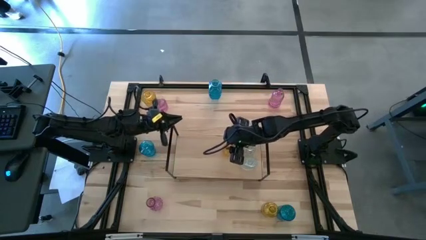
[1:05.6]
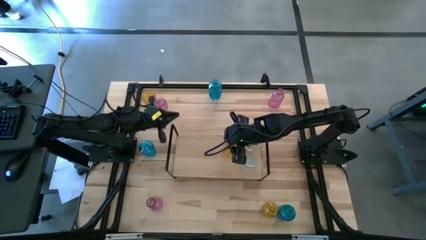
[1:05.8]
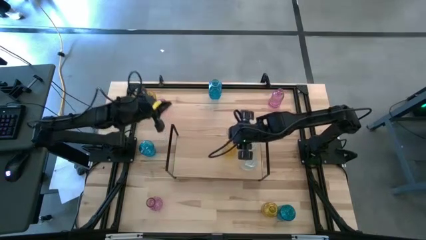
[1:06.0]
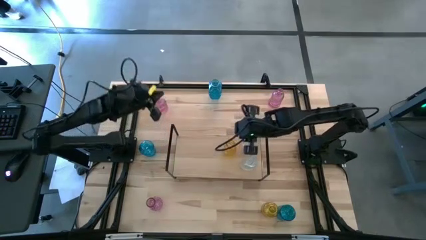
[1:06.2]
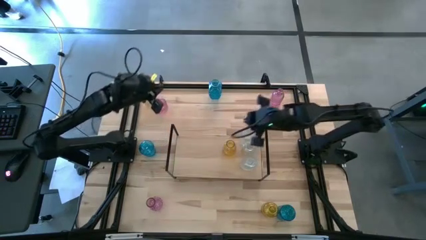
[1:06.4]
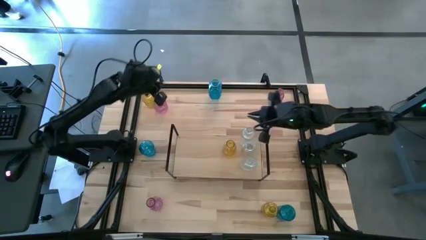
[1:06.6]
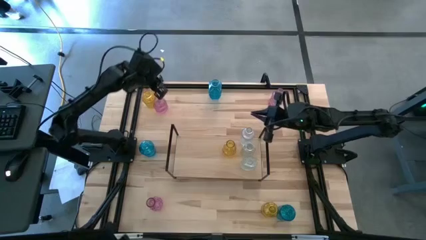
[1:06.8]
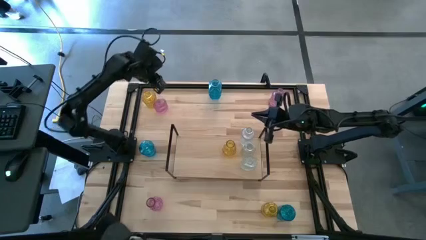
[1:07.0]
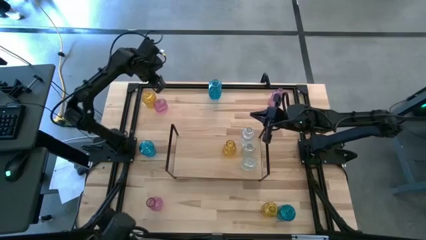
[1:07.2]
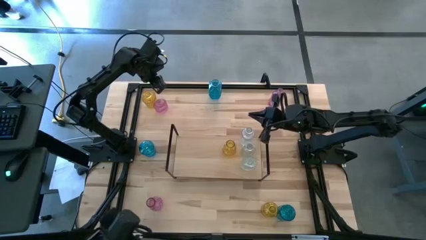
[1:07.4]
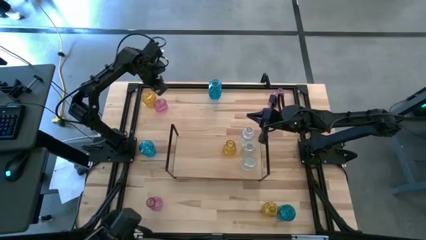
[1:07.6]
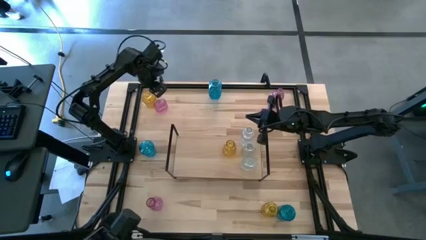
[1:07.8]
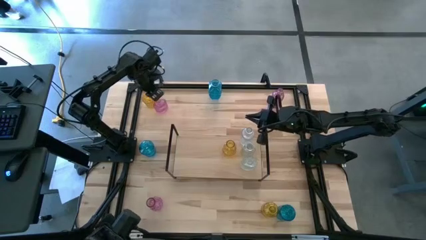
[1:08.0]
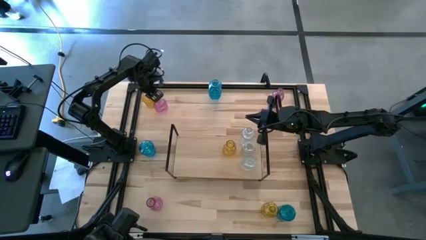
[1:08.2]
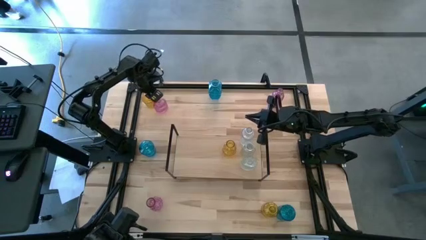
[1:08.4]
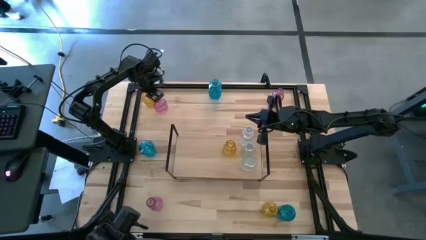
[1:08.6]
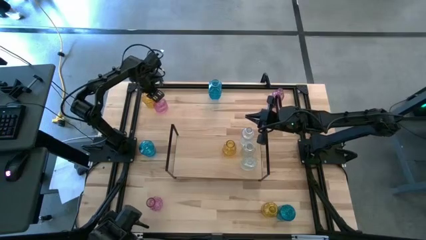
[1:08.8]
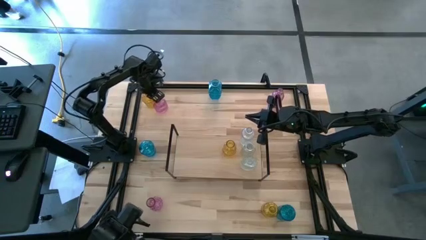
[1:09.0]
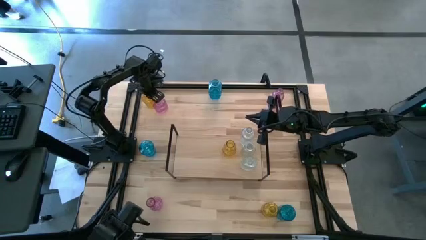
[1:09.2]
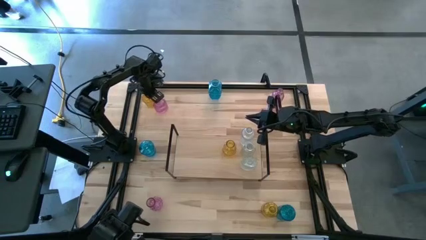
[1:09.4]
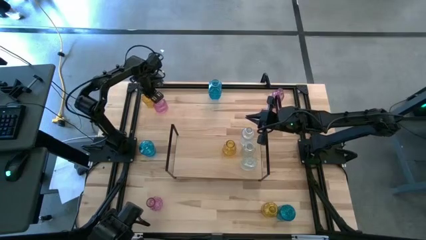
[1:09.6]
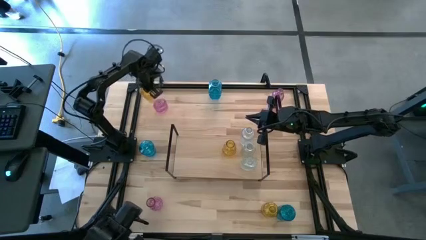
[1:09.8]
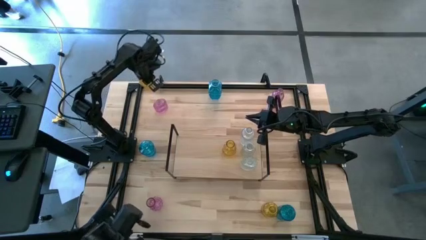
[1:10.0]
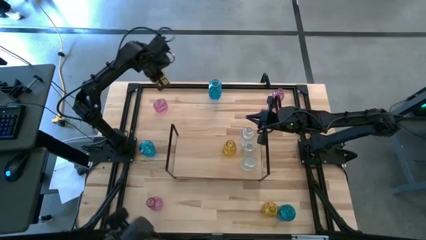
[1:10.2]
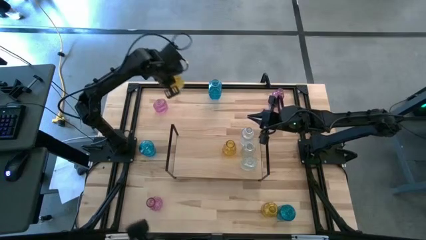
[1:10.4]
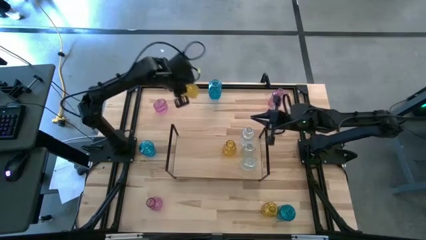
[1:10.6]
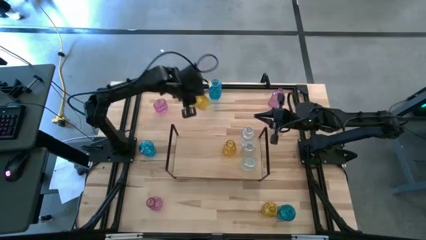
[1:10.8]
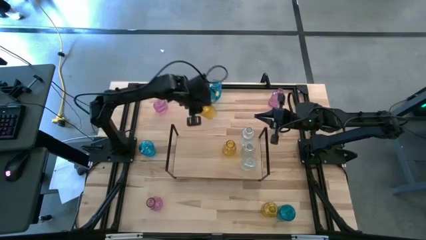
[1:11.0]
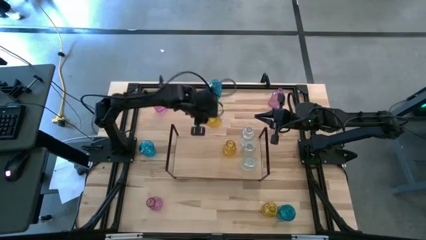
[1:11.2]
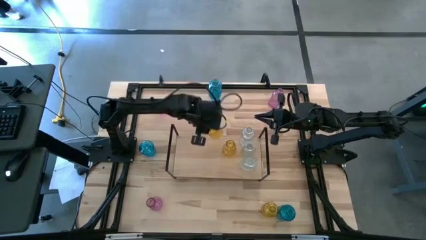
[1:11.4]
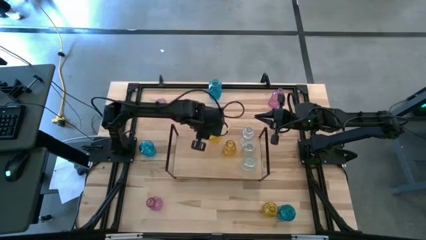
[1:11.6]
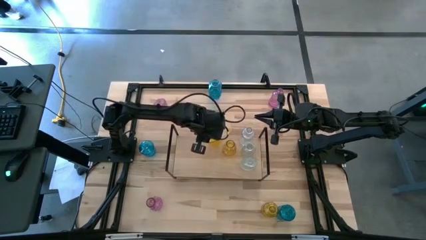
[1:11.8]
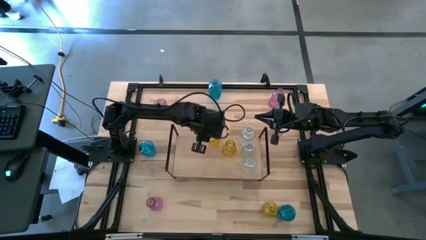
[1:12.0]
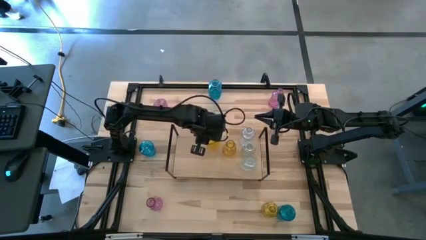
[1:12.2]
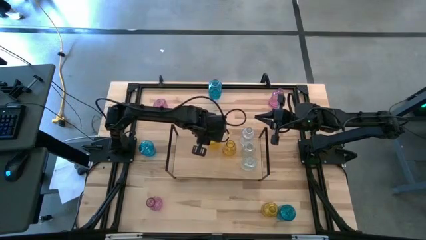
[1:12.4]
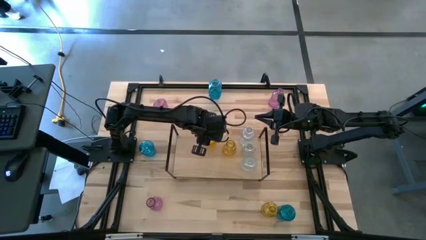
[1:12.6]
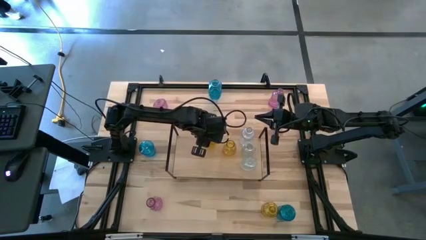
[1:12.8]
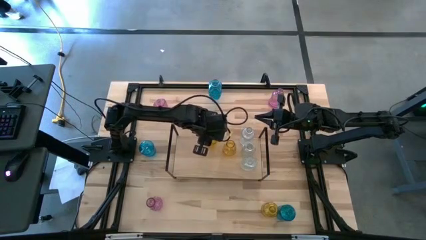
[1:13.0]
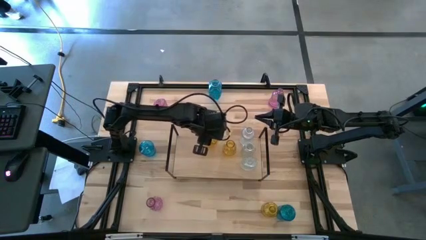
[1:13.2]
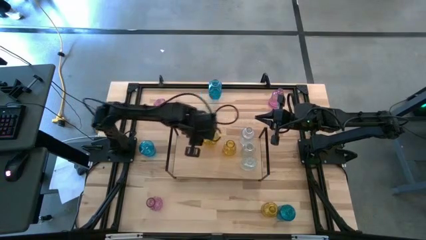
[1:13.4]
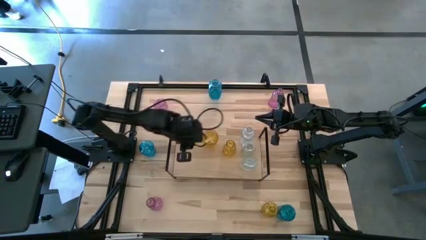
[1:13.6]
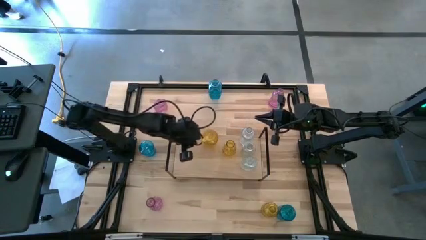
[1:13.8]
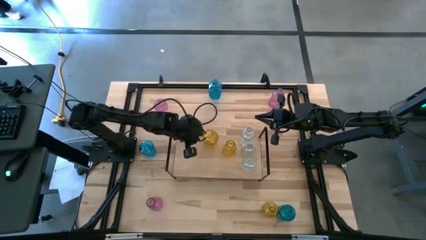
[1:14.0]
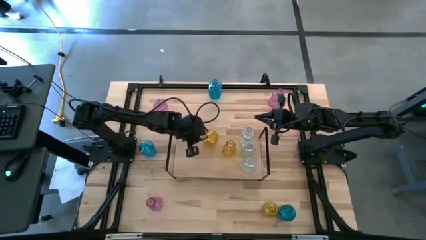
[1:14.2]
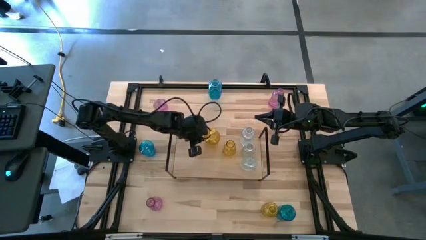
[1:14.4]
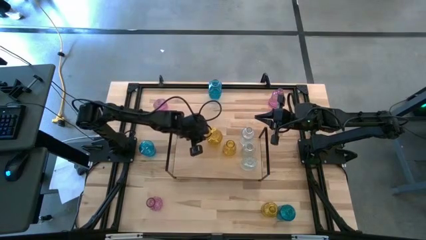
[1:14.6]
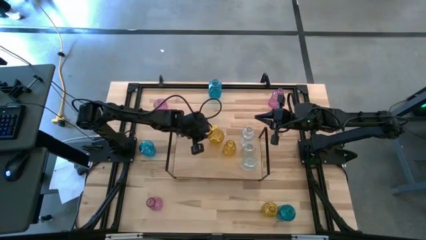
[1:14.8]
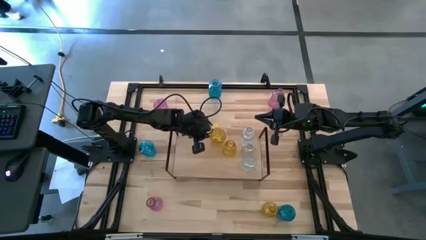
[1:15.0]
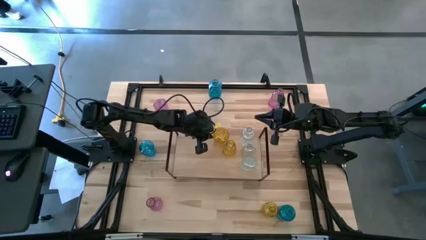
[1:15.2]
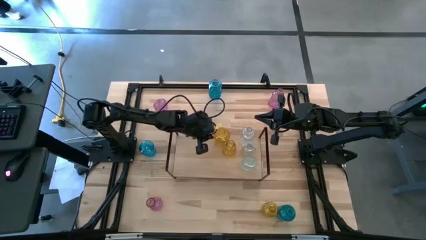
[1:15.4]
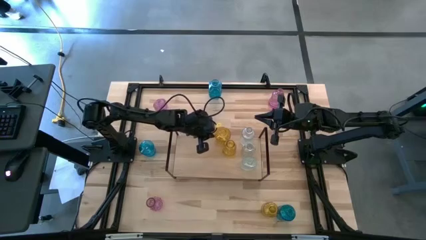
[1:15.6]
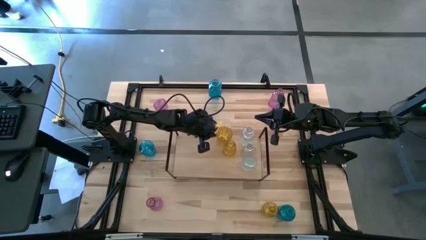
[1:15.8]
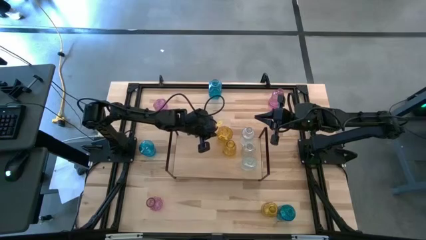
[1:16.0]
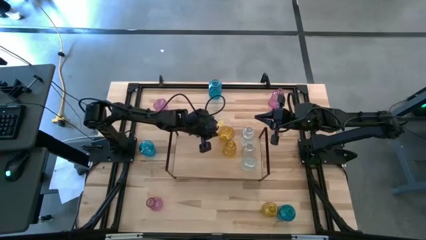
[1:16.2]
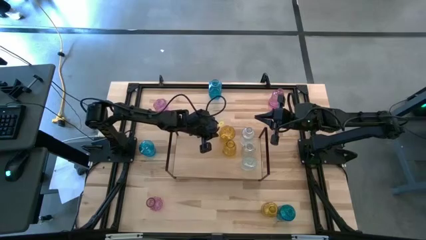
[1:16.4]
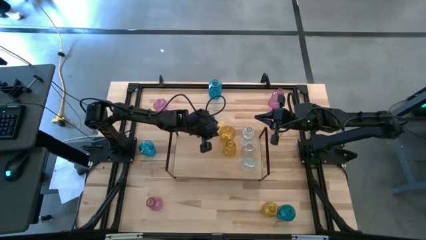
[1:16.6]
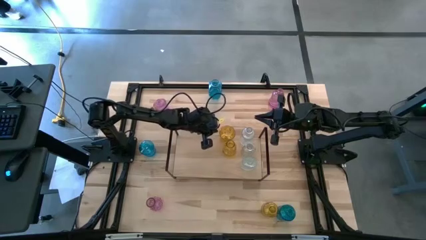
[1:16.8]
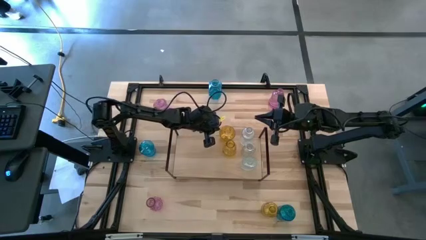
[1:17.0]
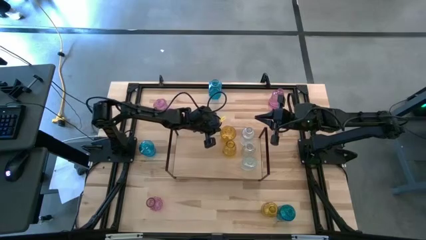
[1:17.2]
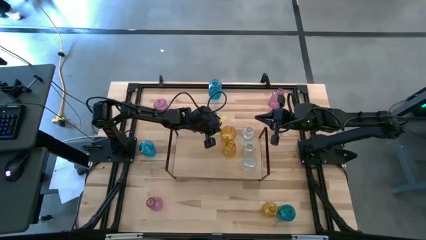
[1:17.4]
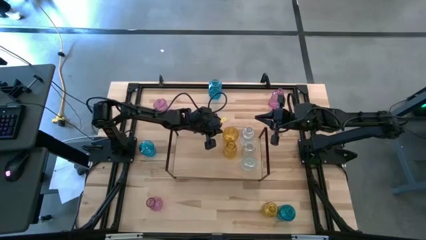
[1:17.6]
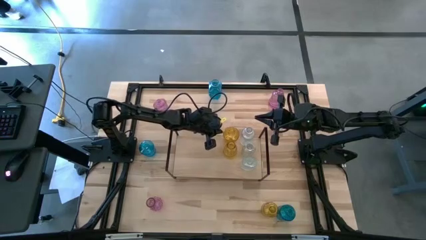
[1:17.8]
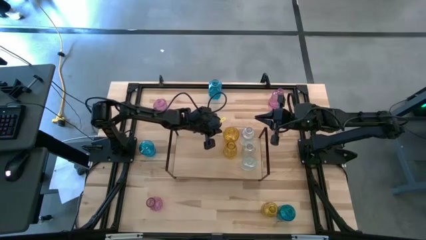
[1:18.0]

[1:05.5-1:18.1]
Task: sort vases onto shelf
Put the top yellow vase on the shelf aligned with the other yellow vase

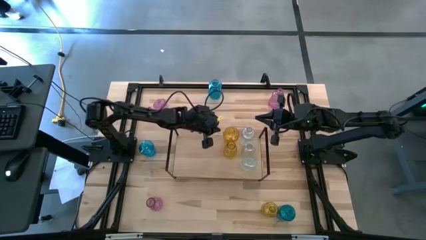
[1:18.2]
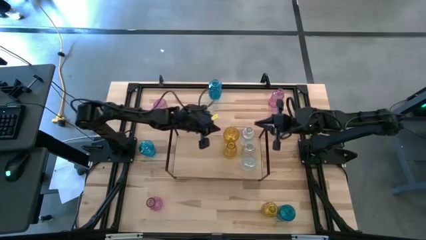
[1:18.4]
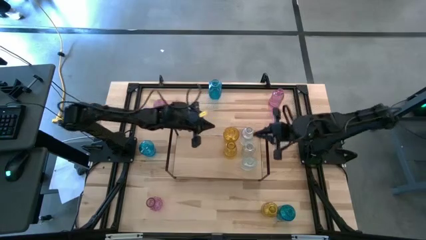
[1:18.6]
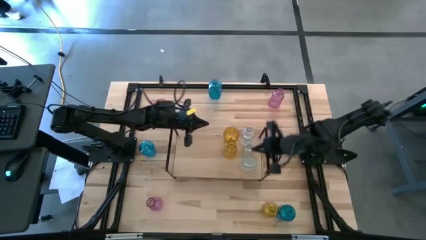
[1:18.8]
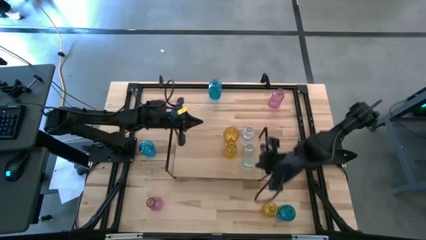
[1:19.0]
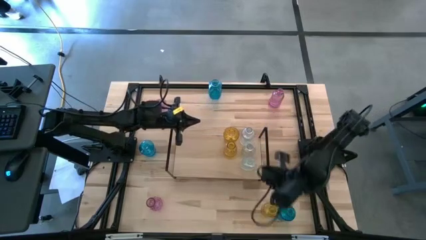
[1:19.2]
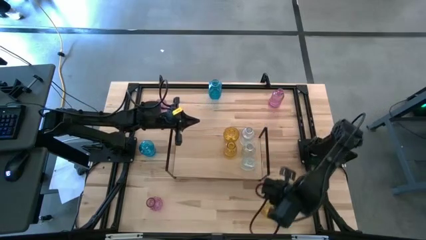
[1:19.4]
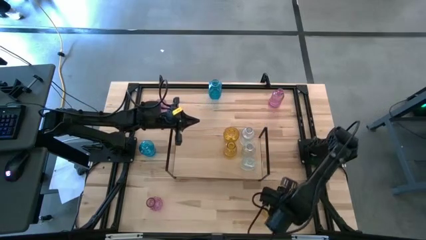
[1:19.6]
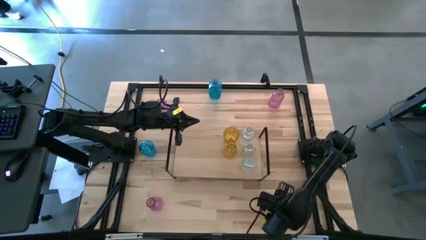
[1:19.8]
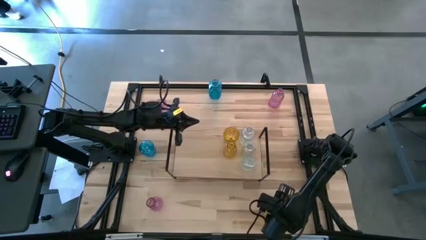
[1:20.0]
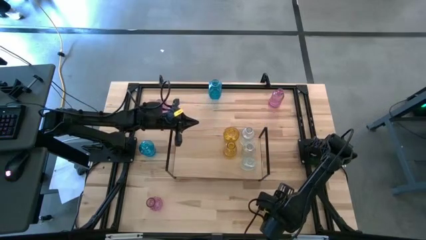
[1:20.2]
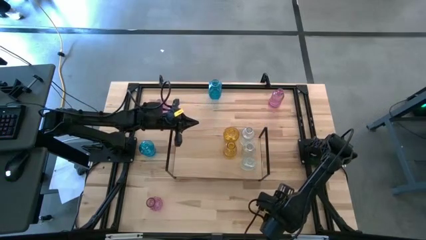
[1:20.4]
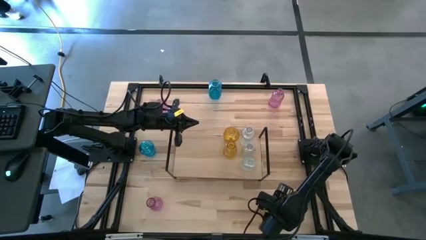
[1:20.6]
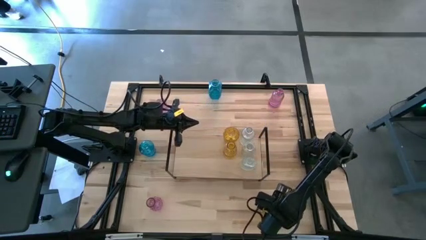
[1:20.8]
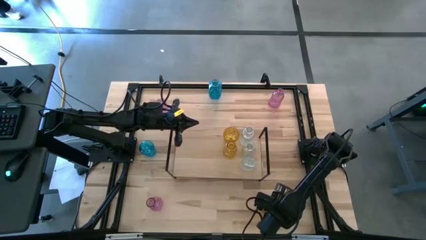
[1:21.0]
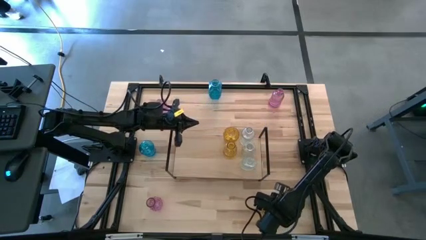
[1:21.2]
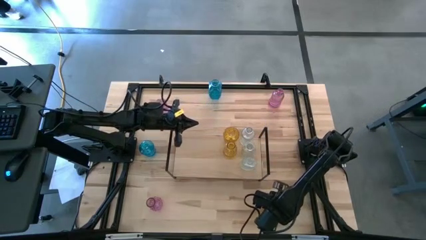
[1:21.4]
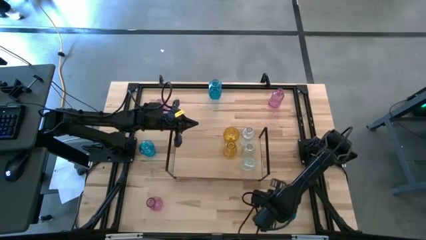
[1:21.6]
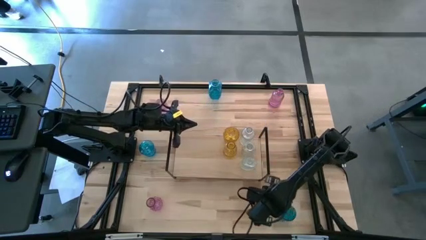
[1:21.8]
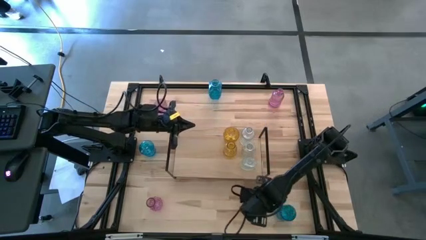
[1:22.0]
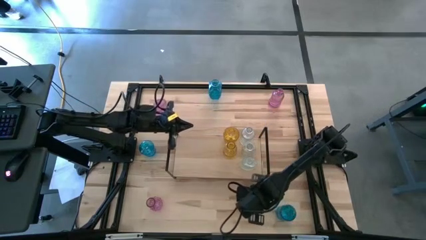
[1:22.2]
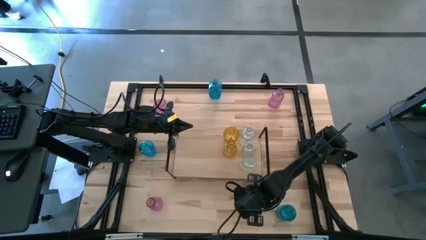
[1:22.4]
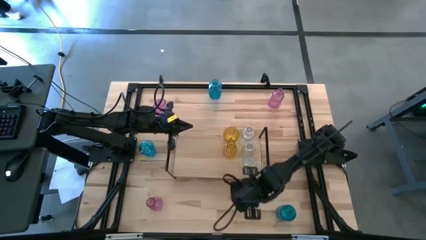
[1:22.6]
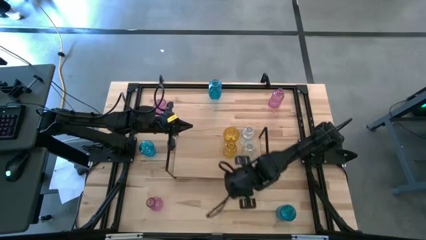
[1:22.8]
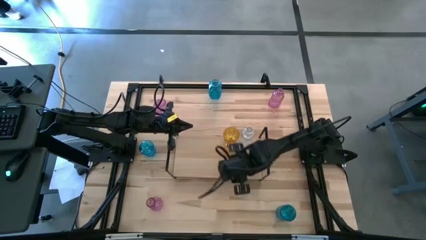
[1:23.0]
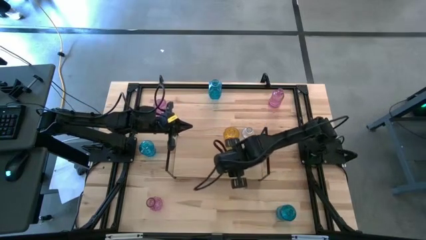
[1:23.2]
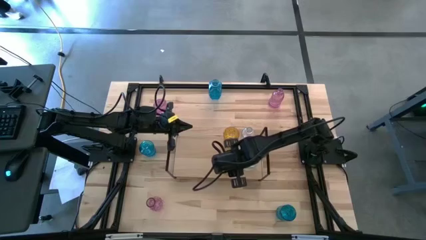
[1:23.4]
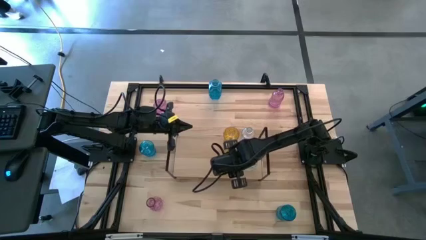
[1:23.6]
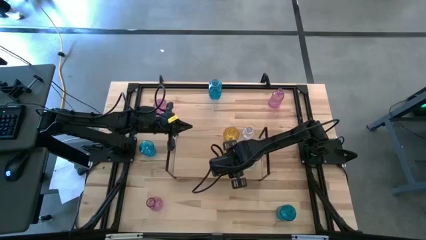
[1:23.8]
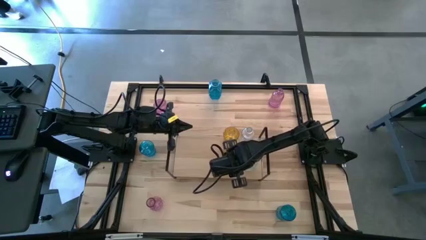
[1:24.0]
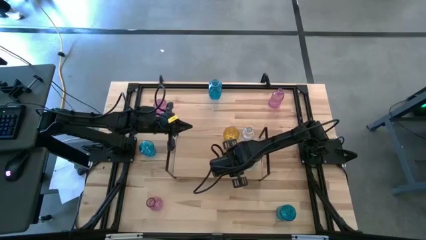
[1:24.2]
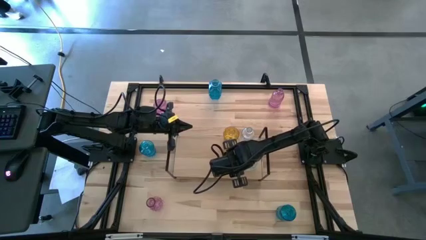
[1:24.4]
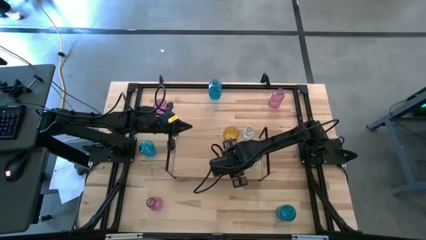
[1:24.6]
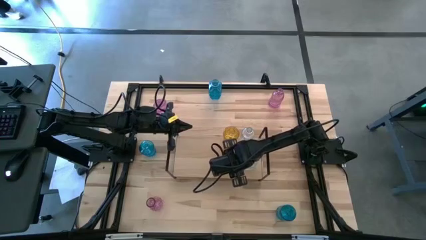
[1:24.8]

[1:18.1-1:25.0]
Put the yellow vase on the shelf aligned with the other yellow vases
